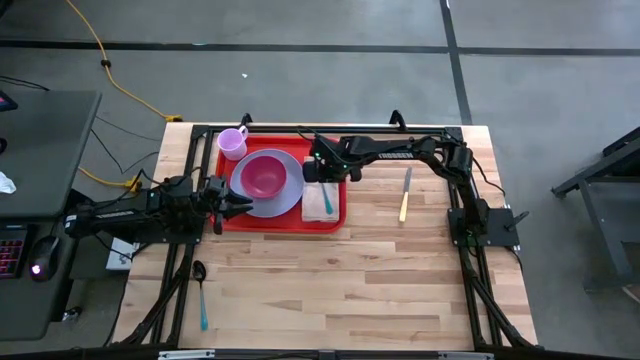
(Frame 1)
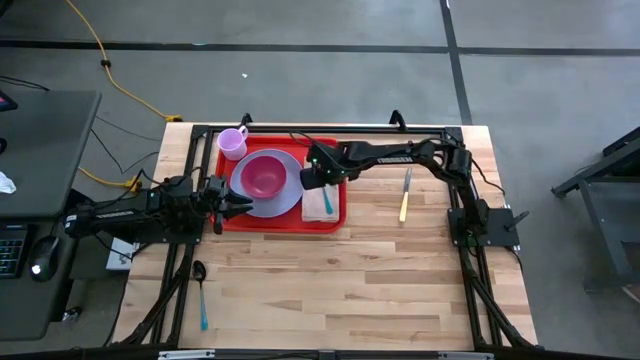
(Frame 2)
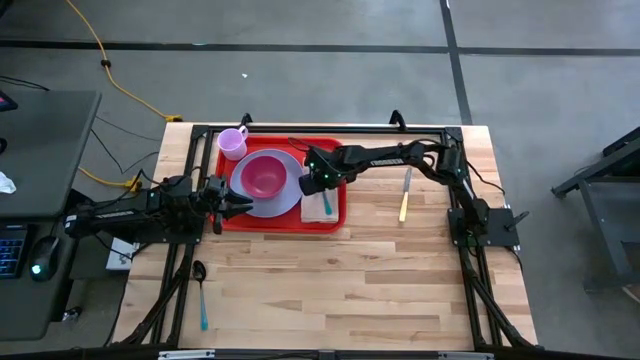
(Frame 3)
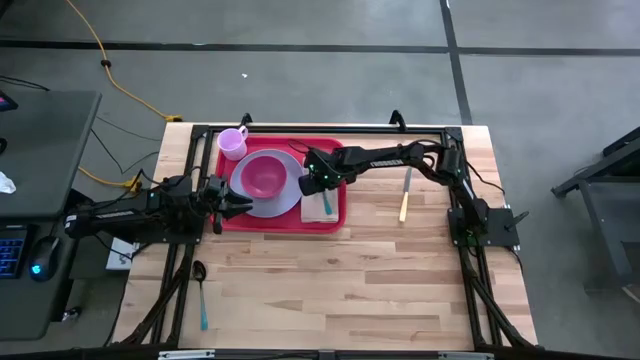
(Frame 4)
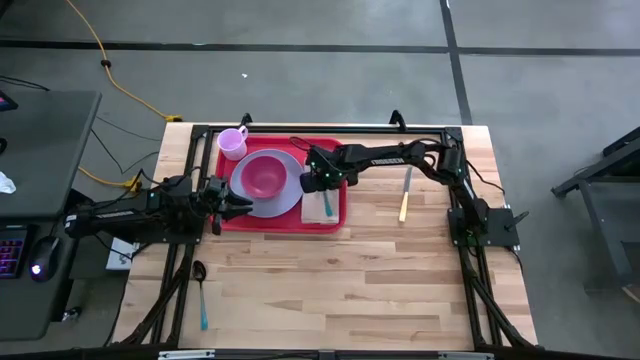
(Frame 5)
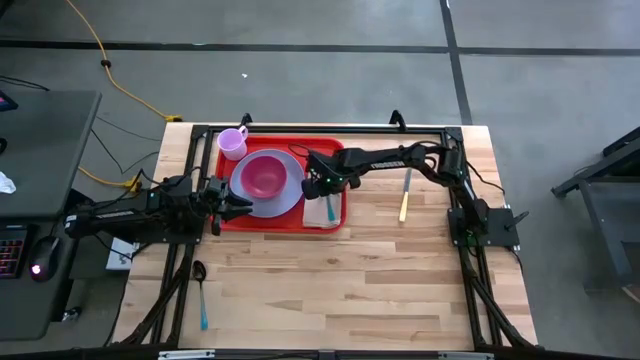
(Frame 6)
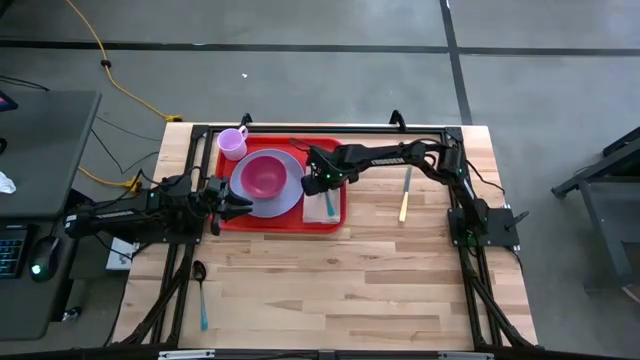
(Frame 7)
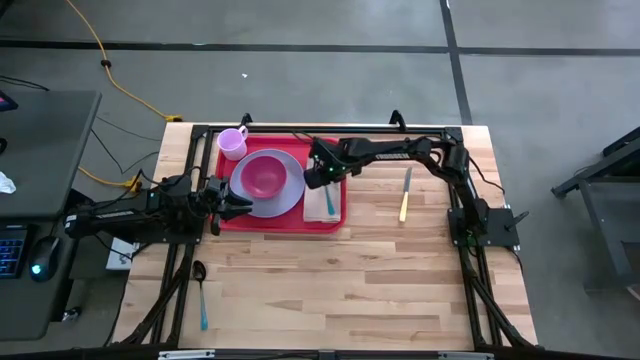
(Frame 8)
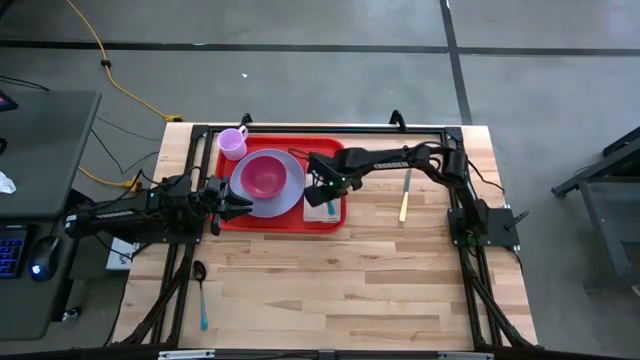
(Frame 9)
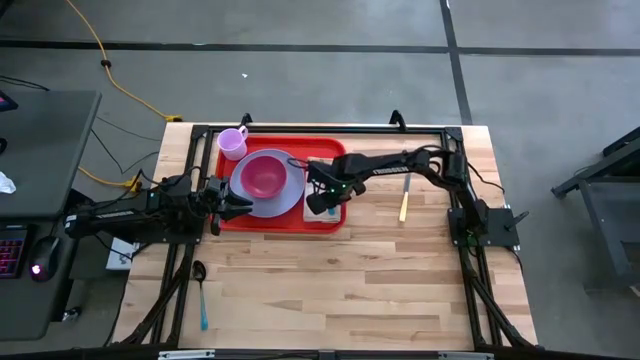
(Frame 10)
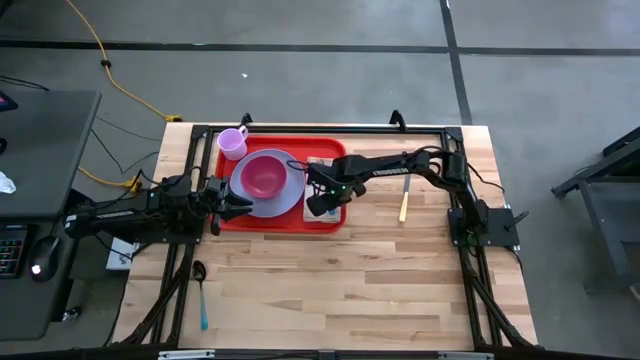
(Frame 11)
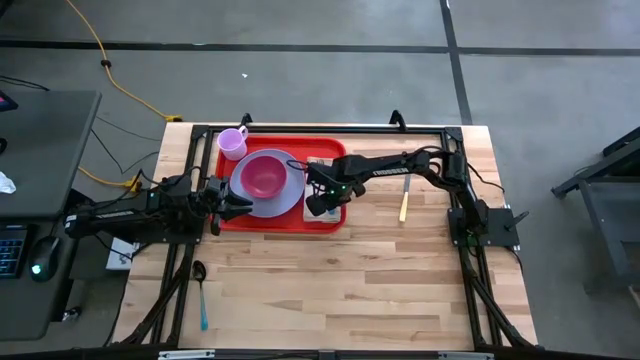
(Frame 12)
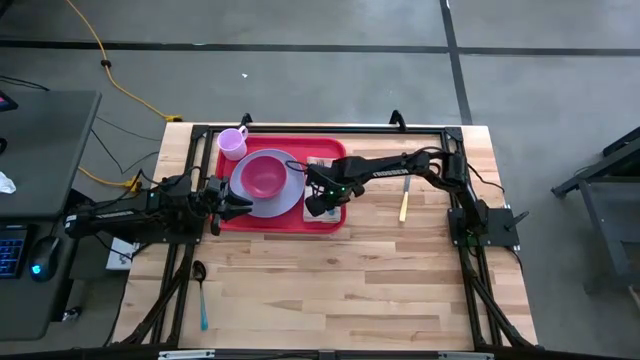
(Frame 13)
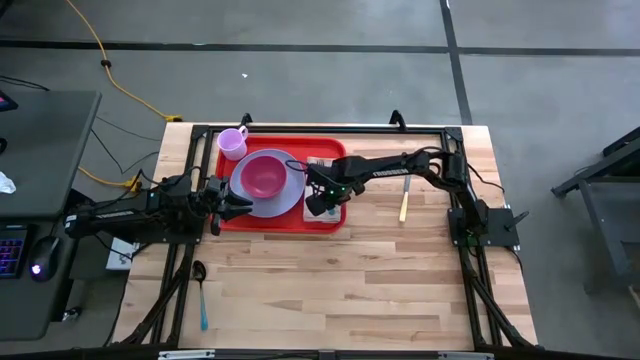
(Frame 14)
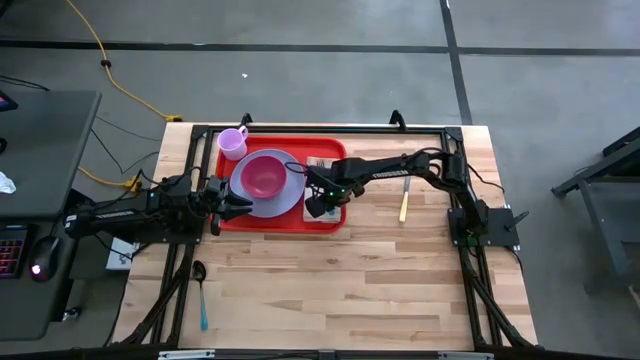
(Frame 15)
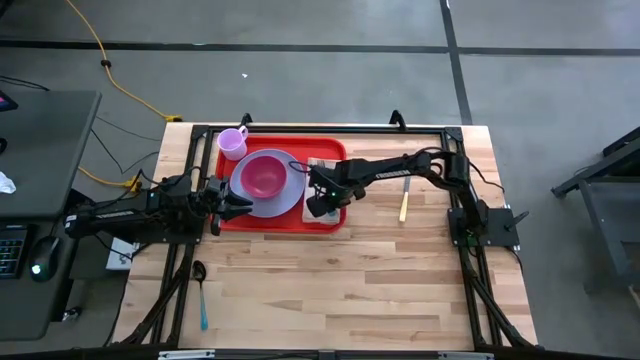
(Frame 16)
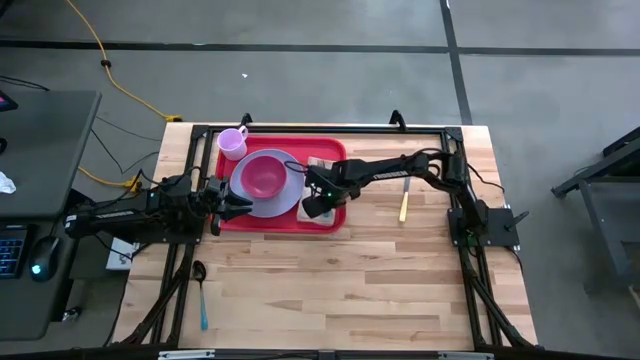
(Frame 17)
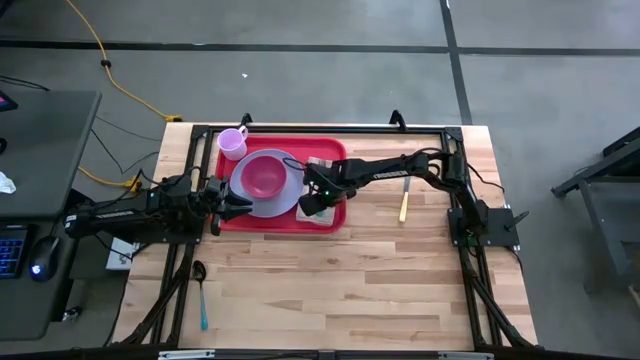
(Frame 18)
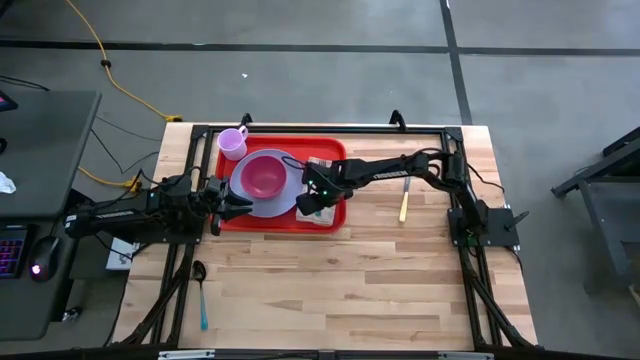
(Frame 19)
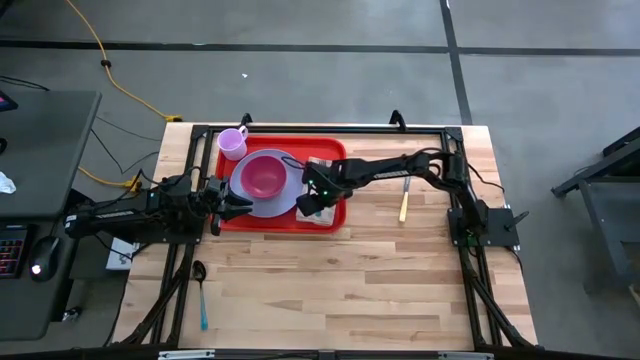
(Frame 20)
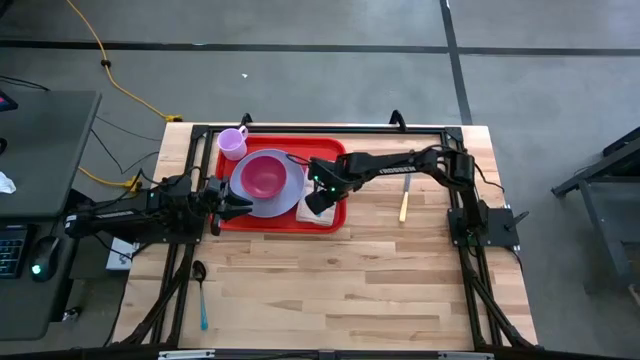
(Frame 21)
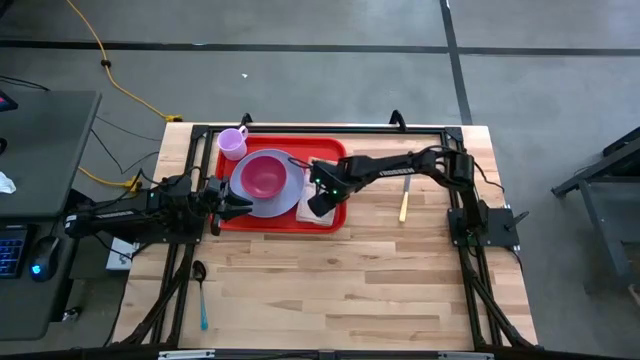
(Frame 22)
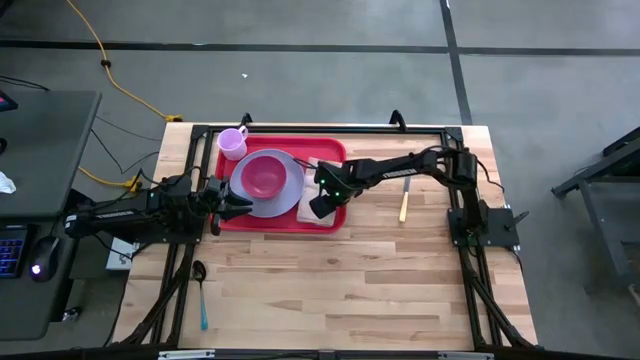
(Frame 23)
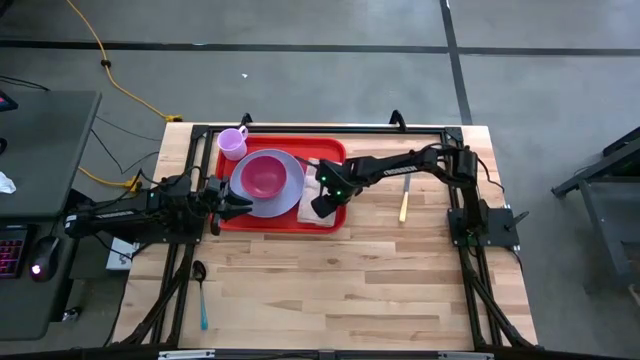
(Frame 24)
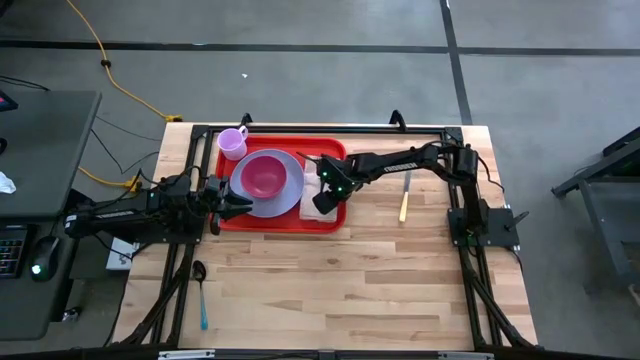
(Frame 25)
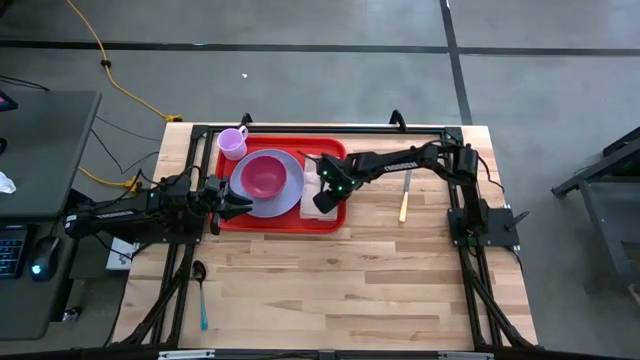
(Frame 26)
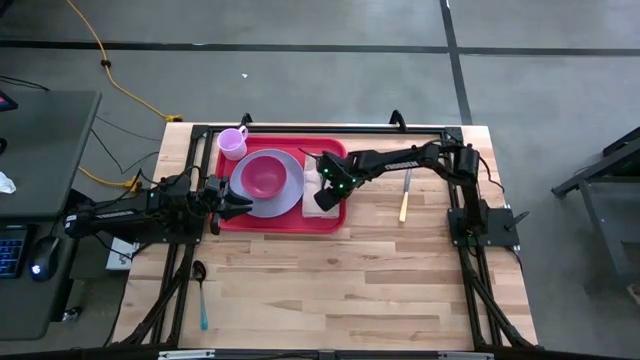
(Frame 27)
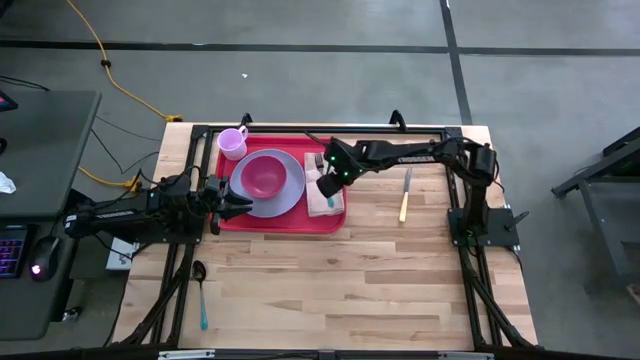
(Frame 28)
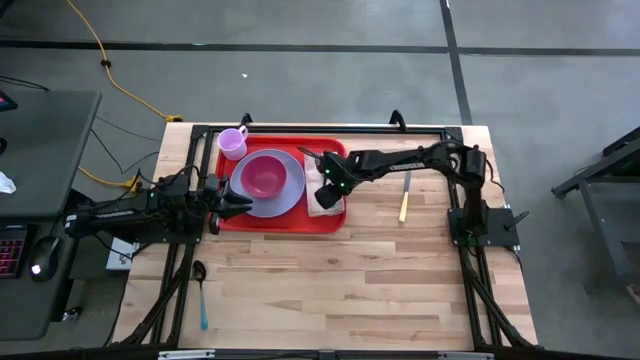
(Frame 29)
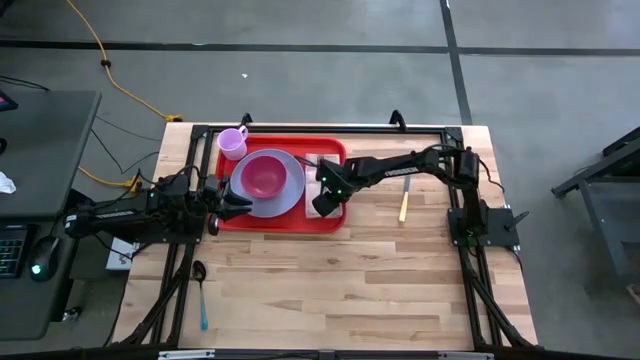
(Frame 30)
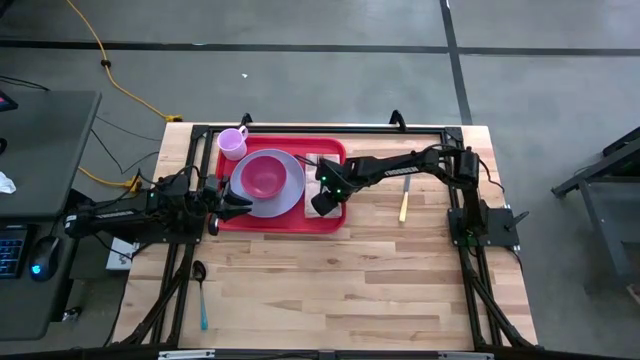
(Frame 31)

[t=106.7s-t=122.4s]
Task: Set up tray
Put the blue fork on the white table napkin on the red serving tray

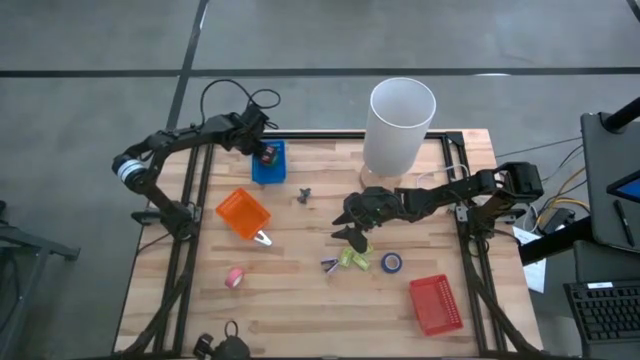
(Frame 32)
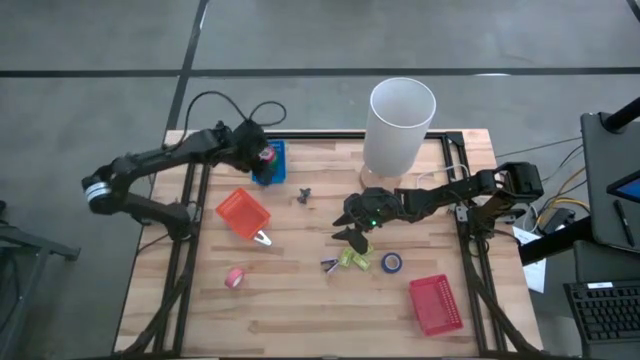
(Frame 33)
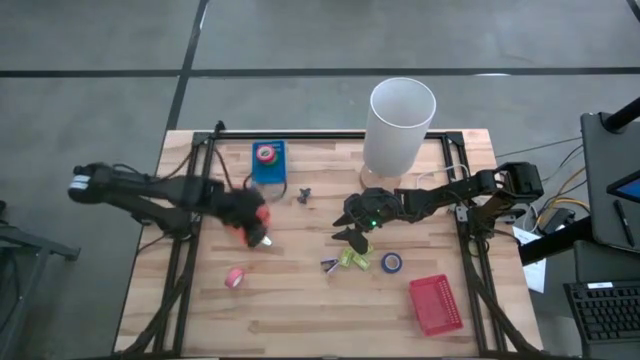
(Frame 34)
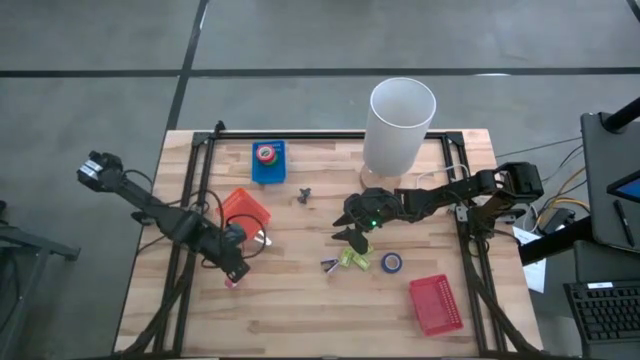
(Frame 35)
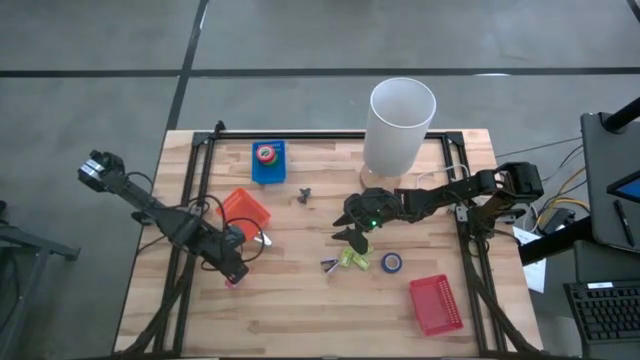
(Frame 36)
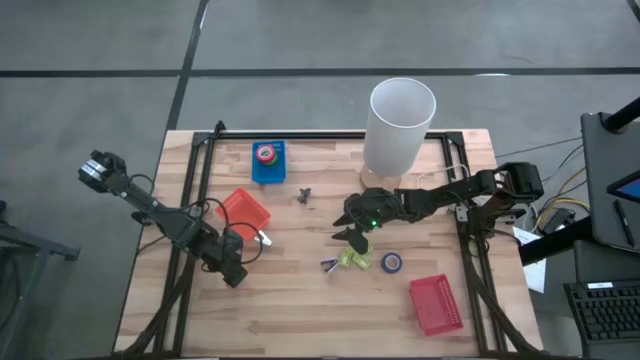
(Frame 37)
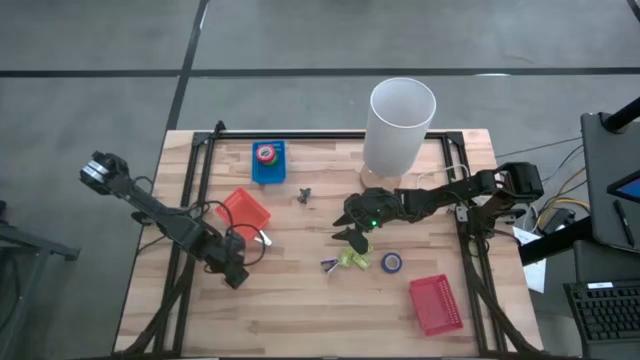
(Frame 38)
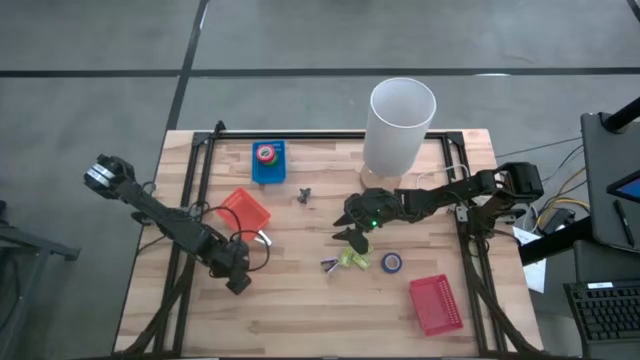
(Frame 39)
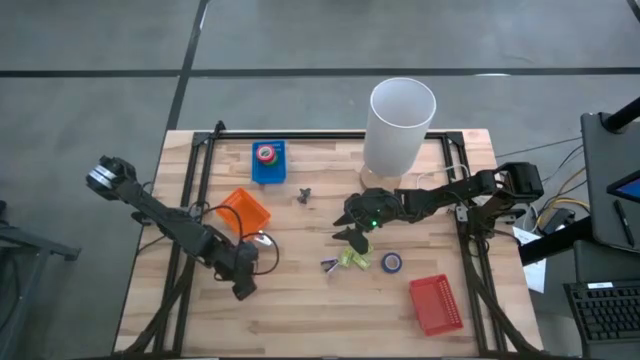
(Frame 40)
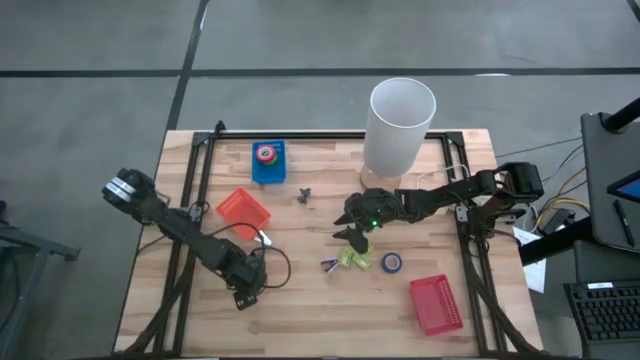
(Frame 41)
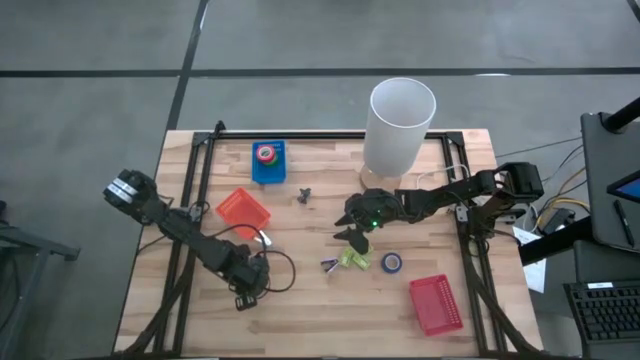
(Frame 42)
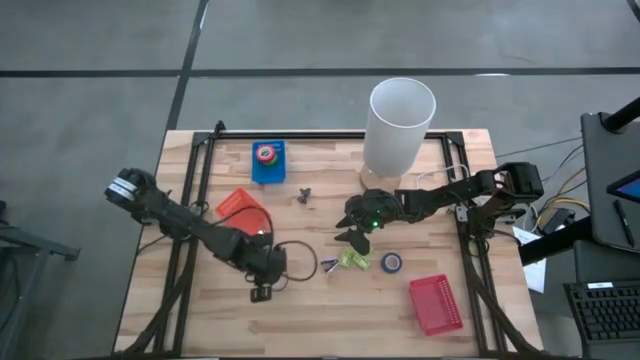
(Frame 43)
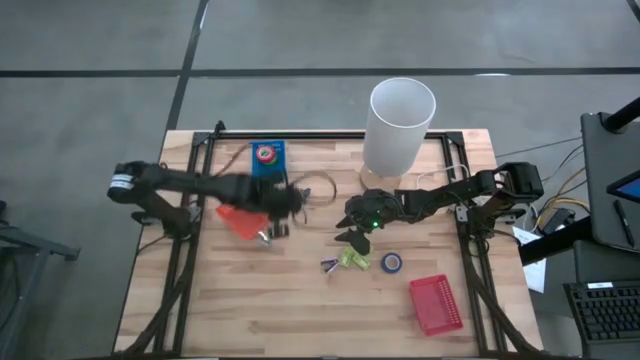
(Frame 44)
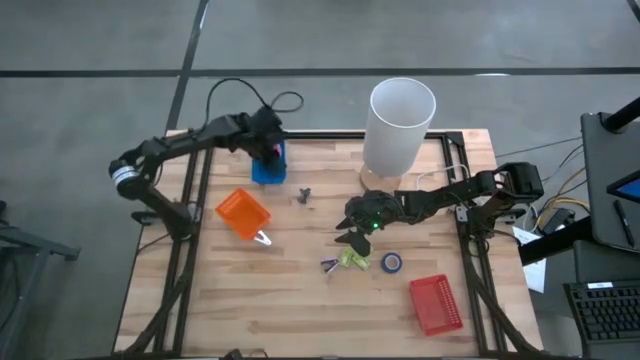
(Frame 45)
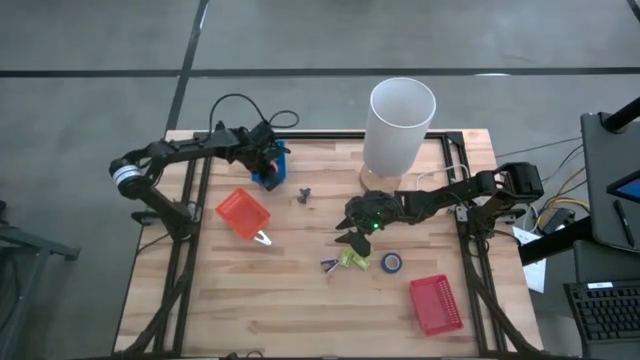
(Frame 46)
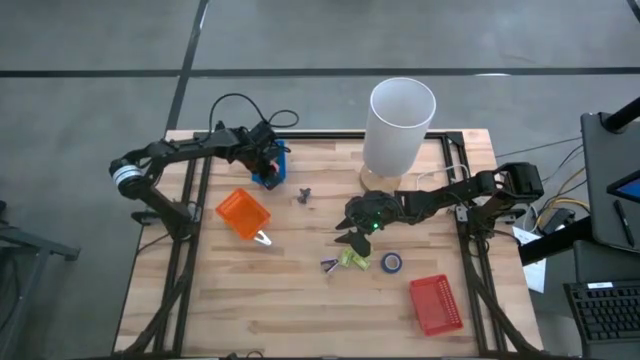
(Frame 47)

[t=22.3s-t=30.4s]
Task: Pick and place Stapler, Stapler remover, tape
Put the pink tape in the blue bin
